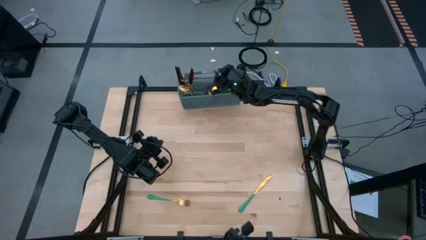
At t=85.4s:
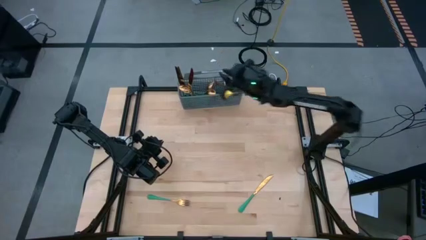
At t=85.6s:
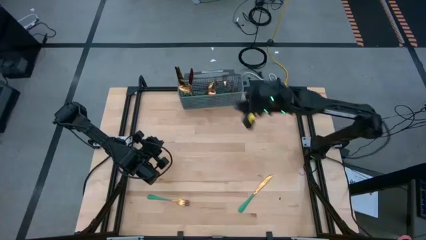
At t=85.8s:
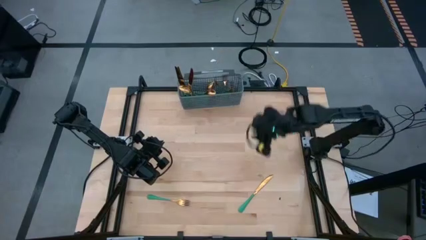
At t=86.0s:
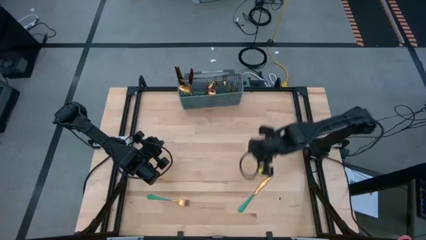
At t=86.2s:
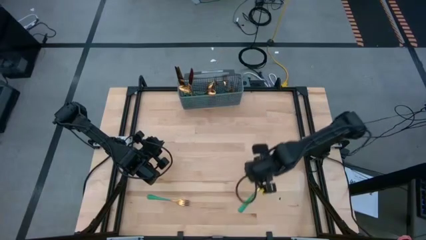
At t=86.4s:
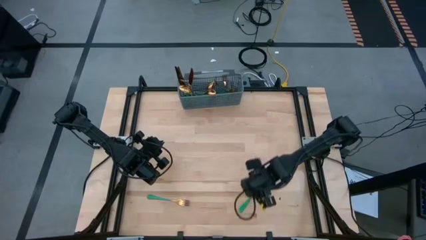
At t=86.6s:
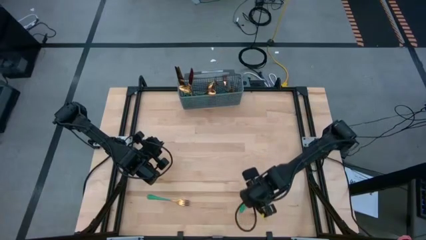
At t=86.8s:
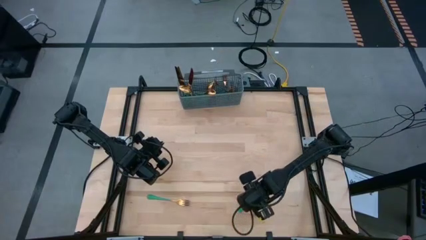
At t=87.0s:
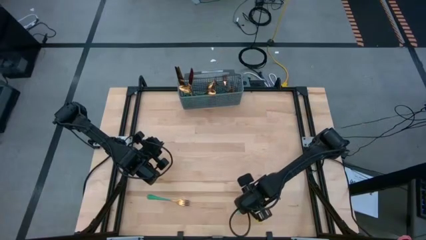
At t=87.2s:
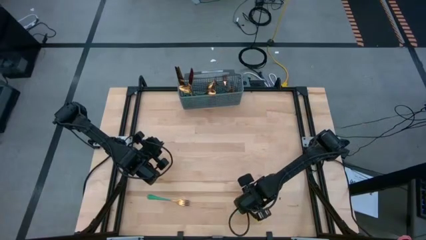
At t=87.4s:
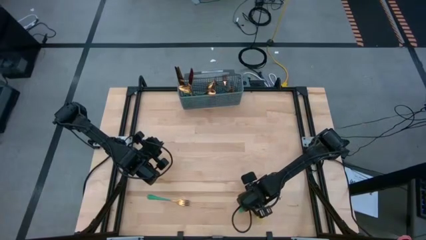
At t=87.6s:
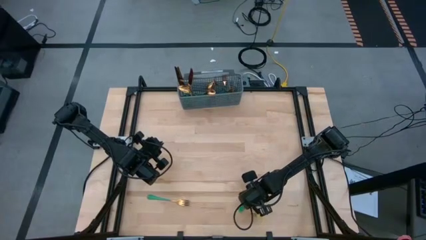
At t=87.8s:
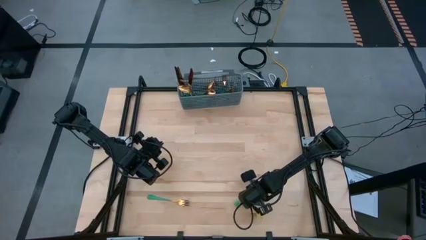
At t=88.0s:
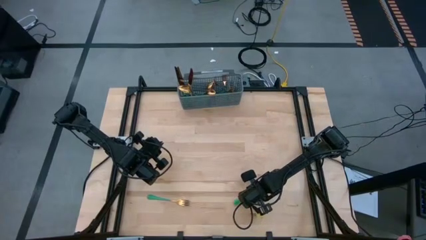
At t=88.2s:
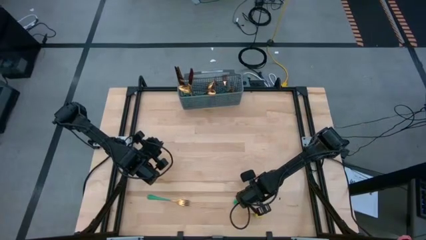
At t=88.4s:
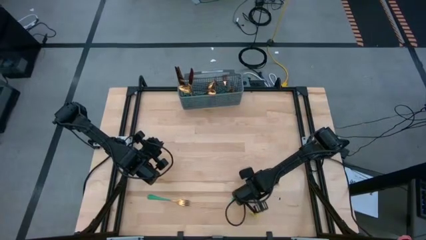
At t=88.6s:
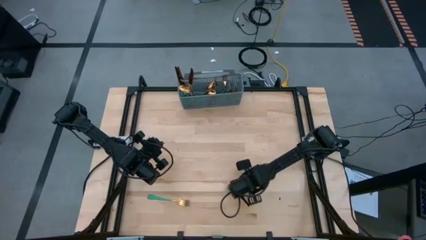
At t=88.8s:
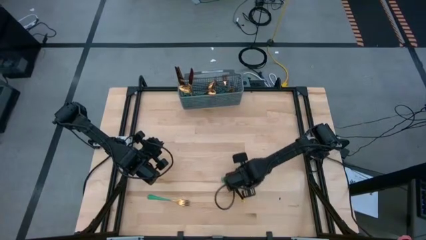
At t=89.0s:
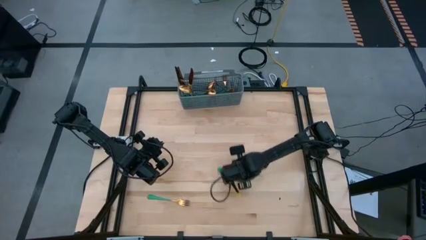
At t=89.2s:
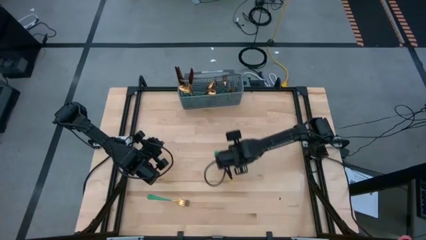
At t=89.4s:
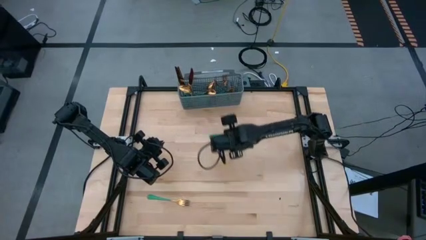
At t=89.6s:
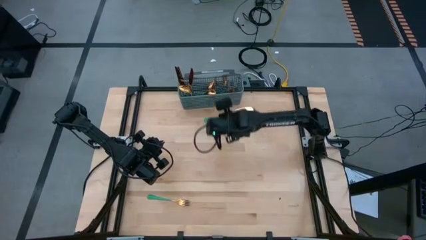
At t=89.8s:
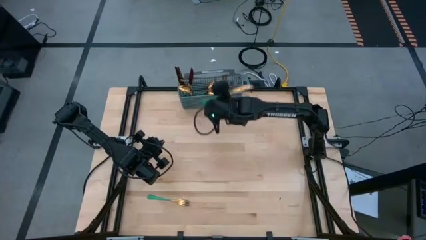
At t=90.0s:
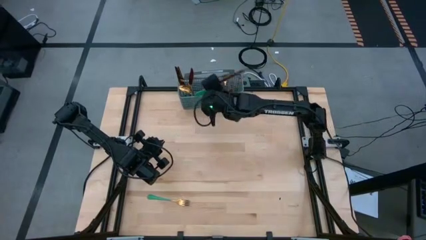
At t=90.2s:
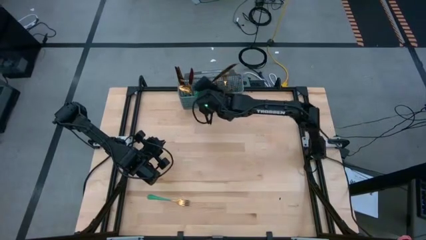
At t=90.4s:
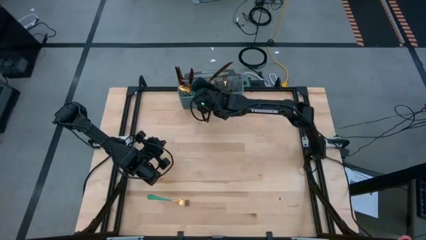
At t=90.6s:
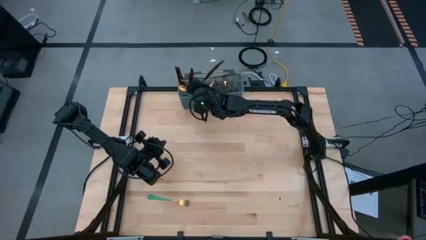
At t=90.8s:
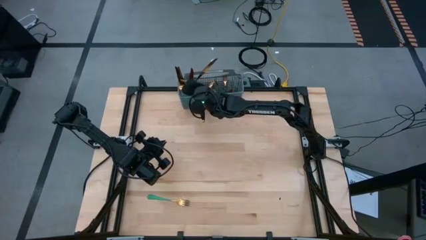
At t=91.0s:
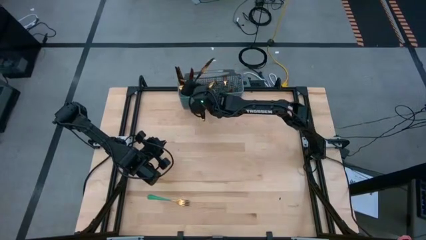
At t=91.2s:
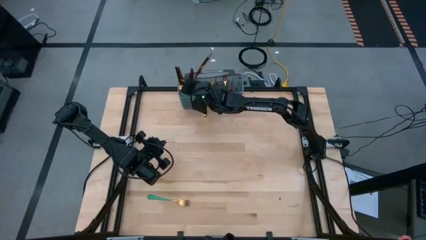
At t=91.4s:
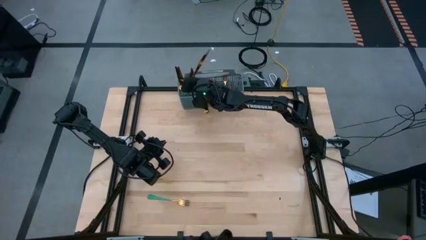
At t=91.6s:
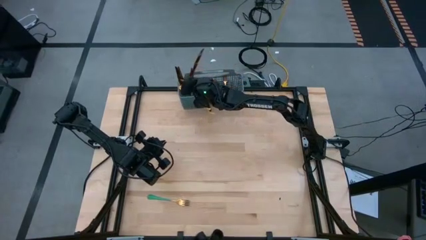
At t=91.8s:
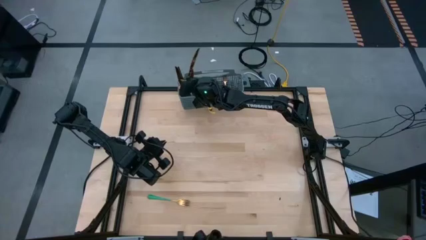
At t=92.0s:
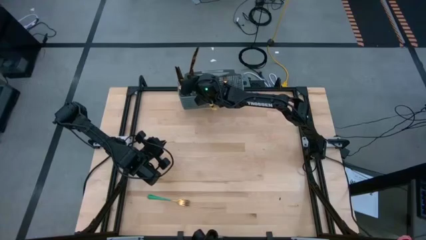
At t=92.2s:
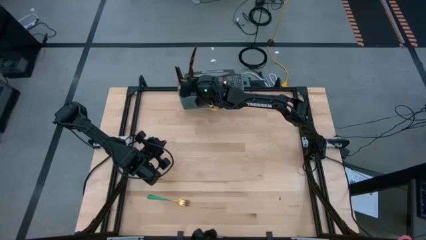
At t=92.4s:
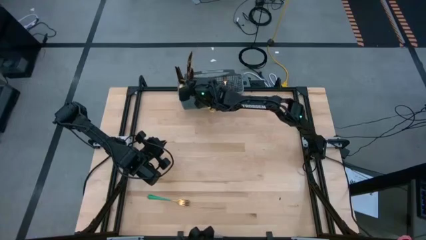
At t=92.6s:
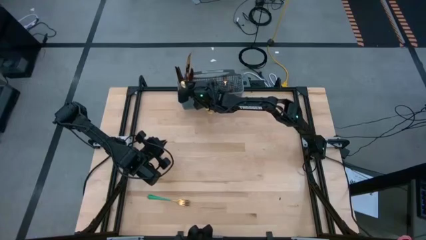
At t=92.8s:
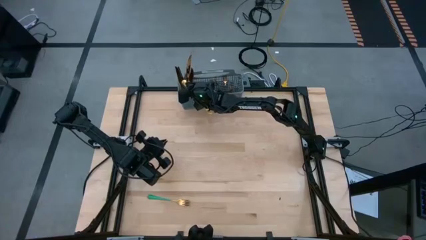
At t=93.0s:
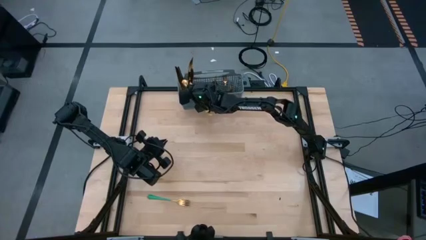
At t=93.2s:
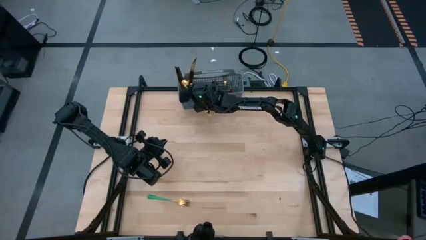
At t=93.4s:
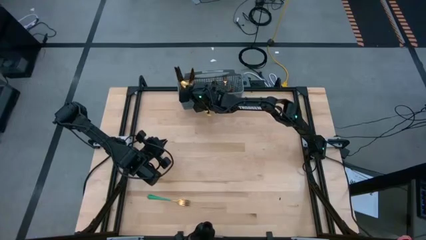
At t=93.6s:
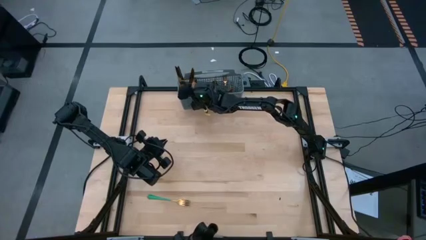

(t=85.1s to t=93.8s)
Task: Sort silverware
Put the green knife into the gray bin

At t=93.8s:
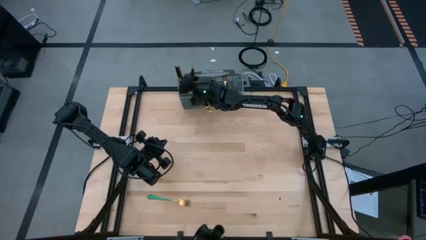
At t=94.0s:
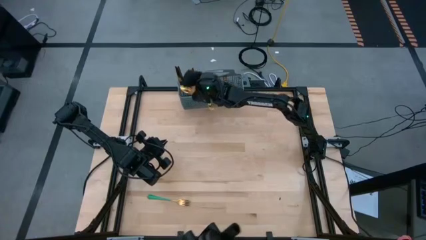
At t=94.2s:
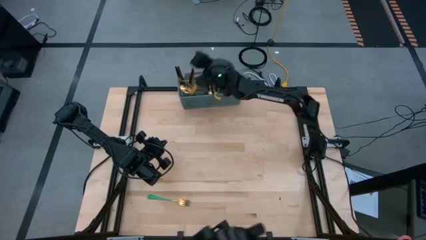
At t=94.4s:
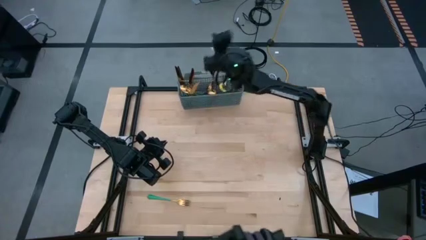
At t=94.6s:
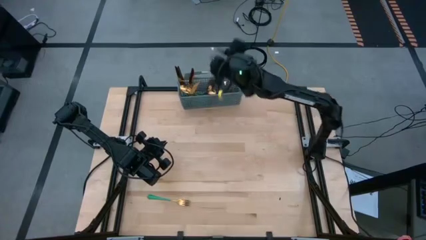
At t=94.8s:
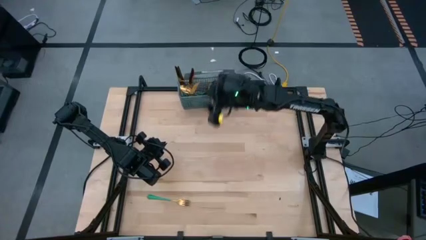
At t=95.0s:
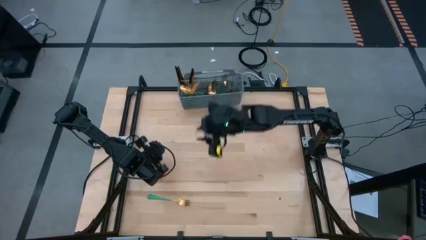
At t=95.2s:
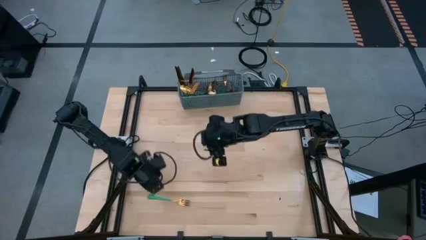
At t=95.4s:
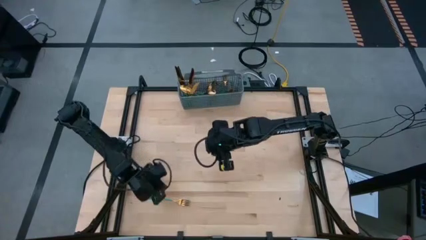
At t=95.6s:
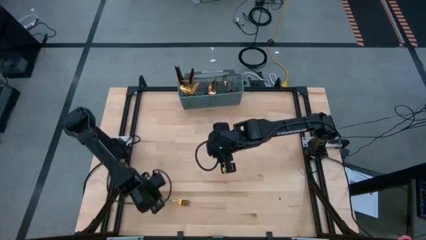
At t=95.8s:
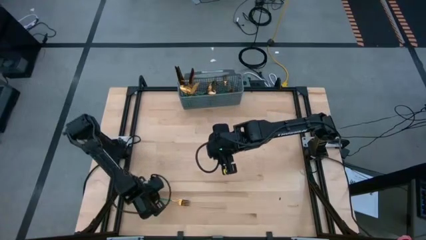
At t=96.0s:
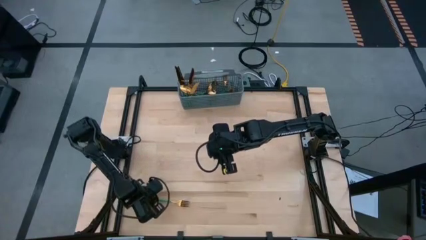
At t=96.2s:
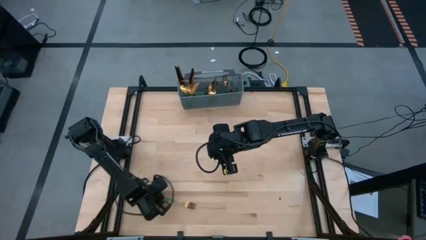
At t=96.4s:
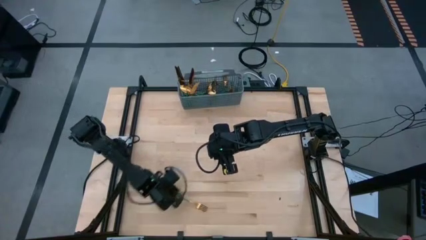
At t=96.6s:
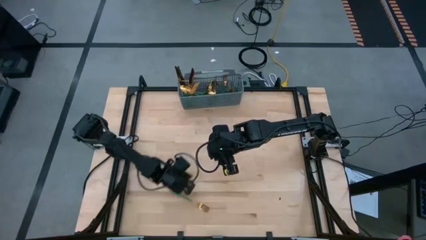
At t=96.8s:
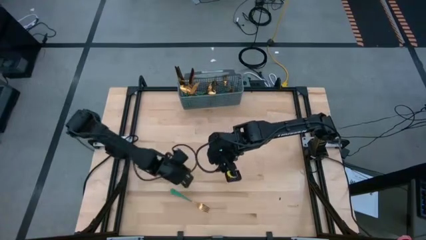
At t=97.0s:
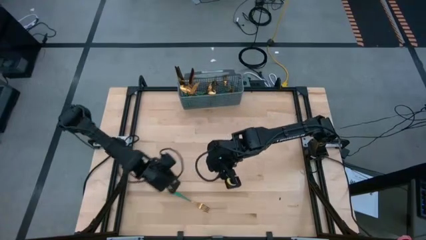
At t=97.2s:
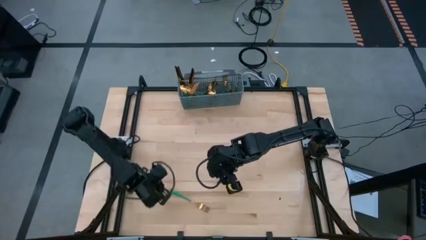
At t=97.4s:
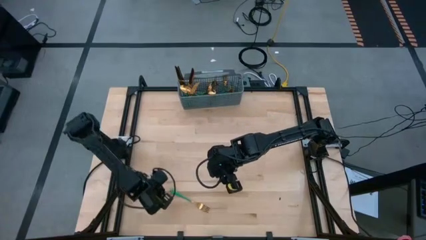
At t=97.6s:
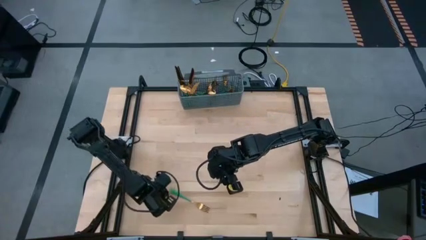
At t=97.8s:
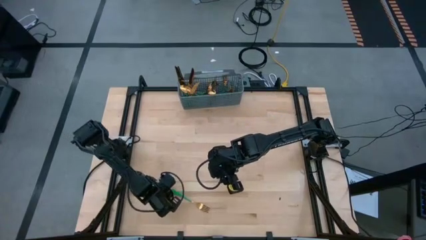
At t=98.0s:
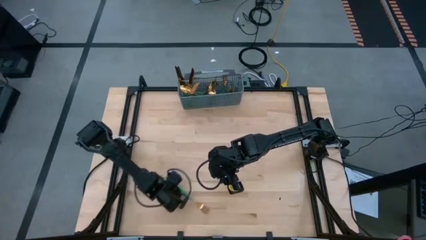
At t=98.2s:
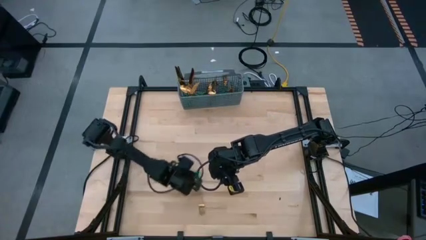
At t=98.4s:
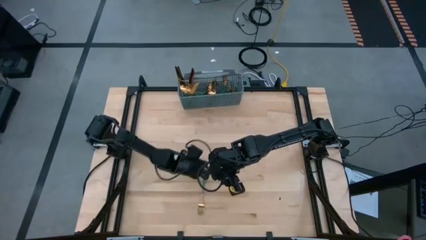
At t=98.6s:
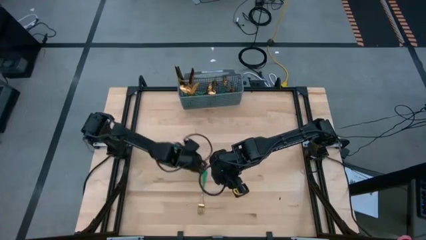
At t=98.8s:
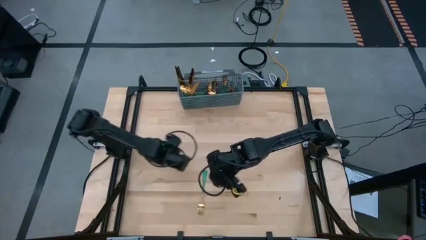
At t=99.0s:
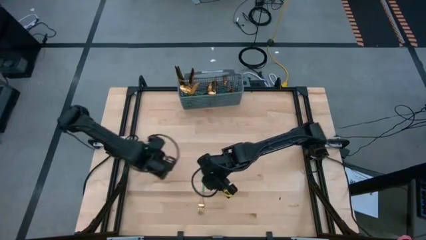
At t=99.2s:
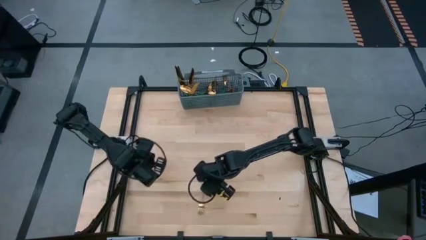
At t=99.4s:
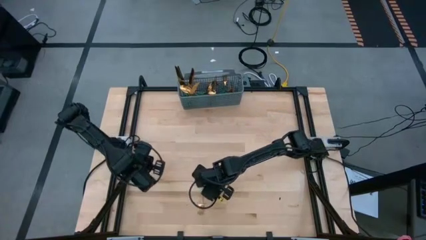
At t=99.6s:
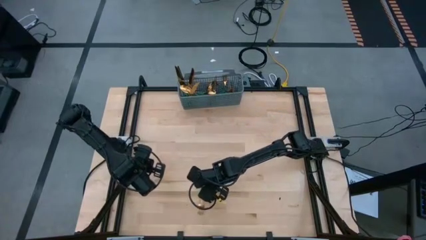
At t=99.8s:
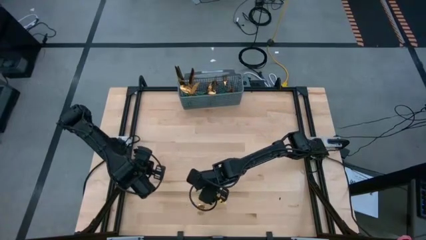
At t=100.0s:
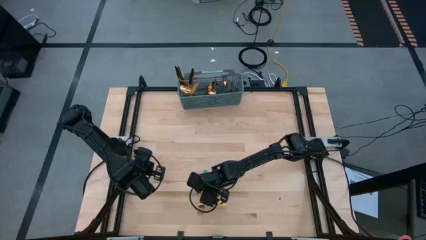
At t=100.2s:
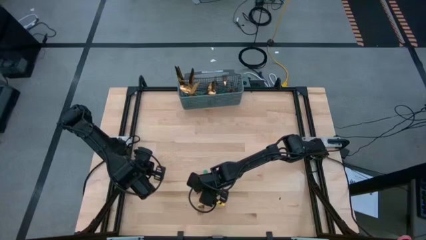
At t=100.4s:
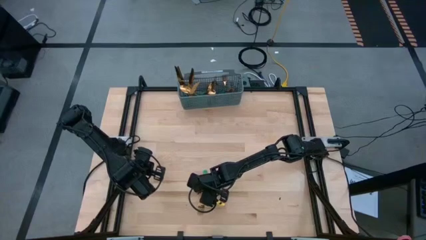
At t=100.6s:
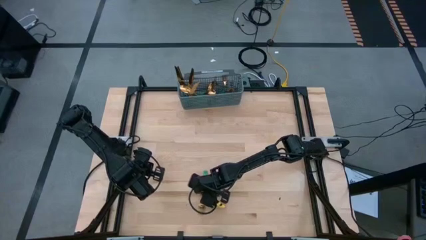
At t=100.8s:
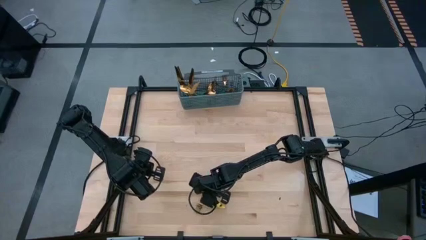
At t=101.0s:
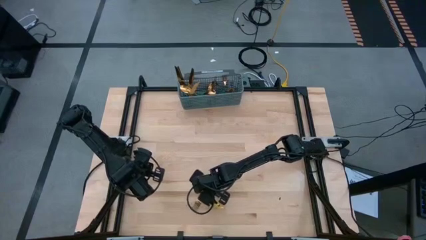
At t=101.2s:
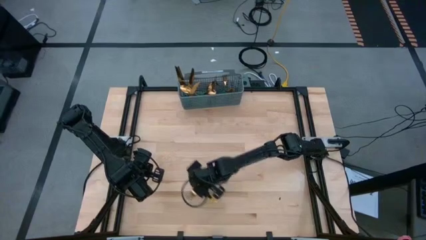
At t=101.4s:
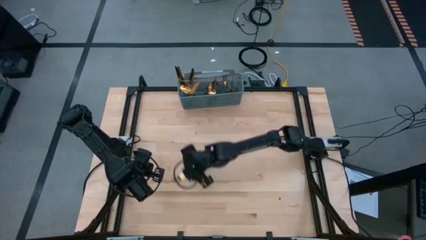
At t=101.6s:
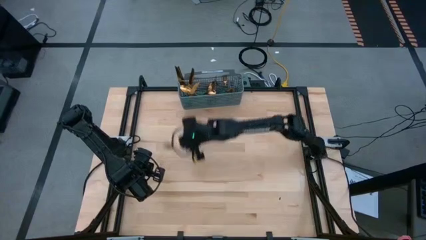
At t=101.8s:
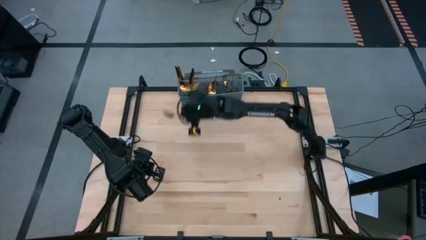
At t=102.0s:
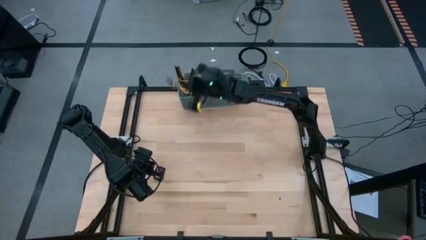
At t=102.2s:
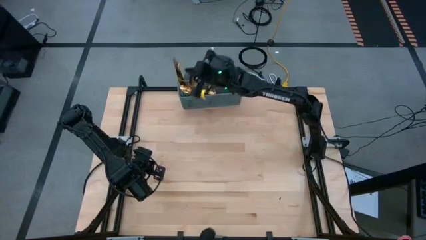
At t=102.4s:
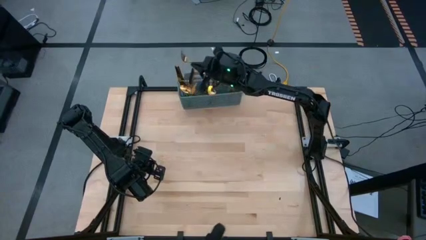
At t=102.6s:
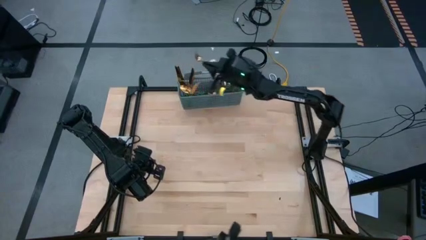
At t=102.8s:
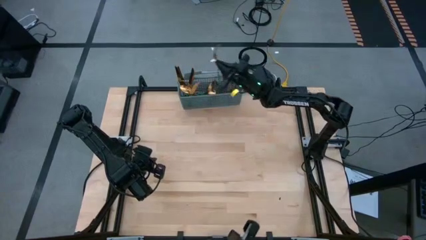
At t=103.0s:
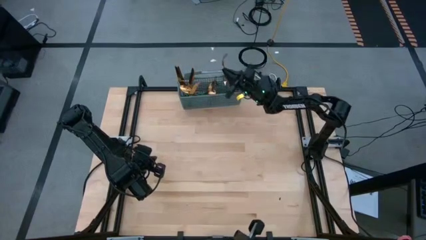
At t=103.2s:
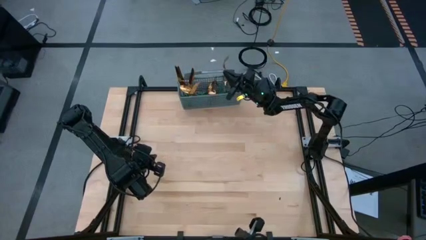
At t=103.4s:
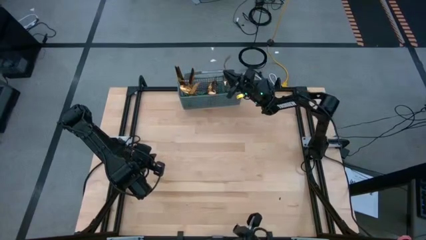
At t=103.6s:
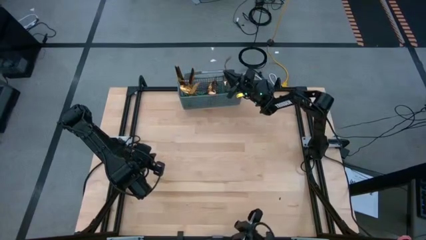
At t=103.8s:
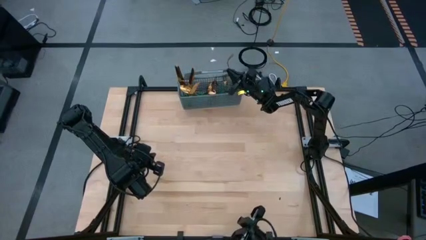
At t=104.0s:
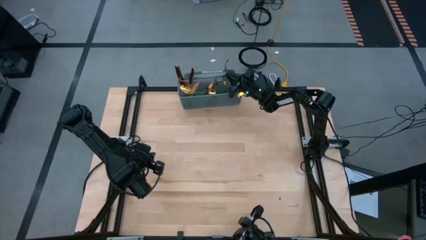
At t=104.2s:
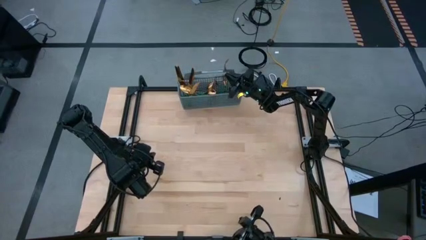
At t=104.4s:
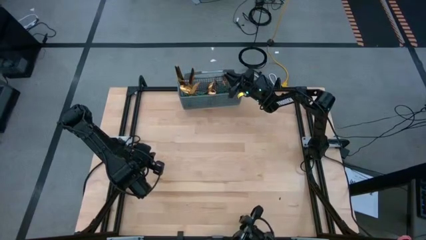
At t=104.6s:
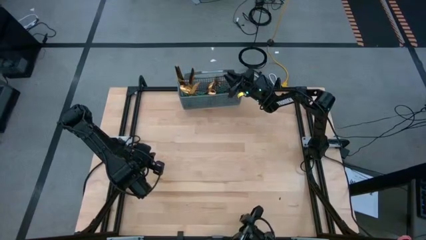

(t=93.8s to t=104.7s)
Put the green fork into the gray bin
